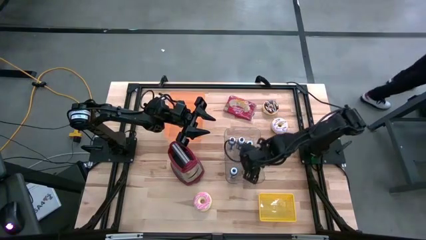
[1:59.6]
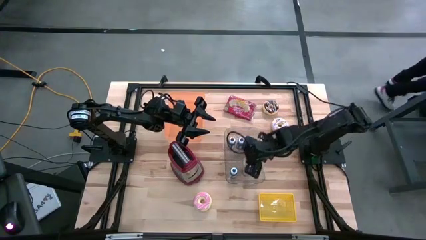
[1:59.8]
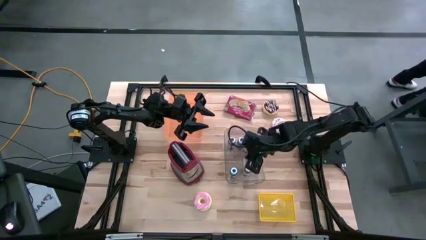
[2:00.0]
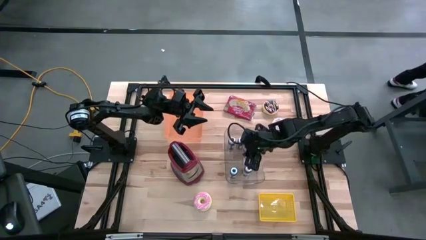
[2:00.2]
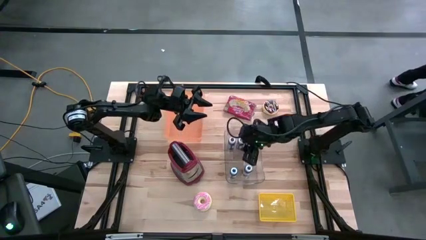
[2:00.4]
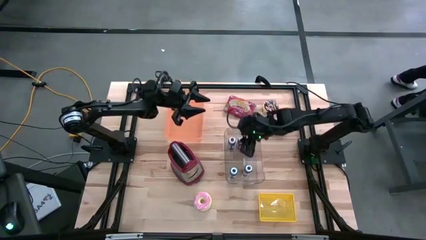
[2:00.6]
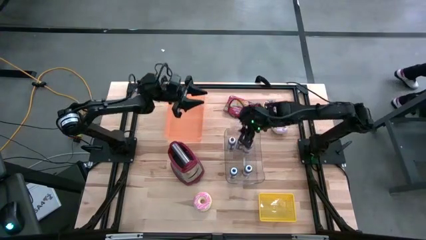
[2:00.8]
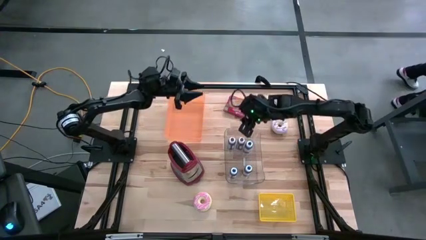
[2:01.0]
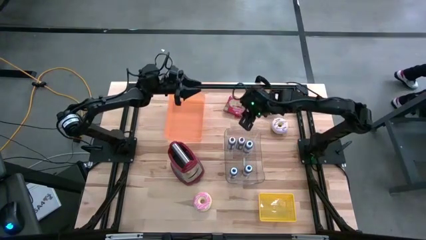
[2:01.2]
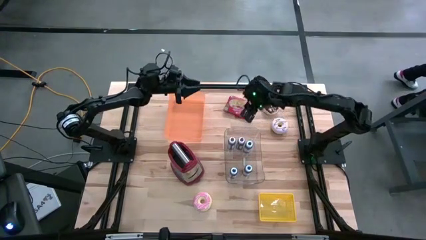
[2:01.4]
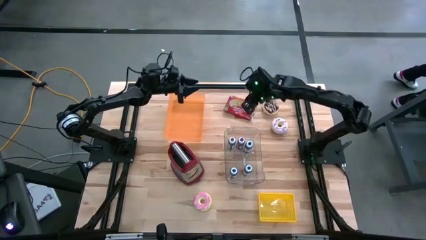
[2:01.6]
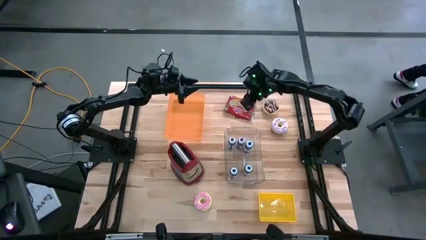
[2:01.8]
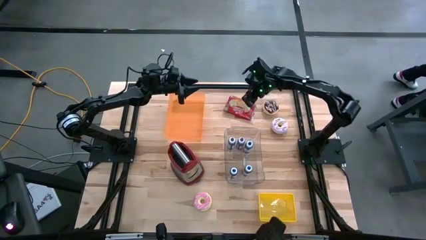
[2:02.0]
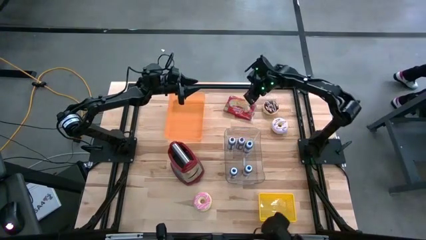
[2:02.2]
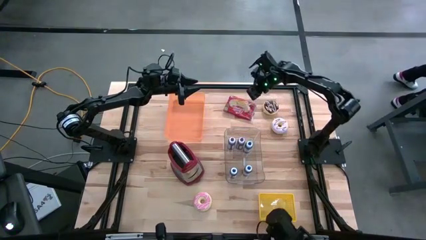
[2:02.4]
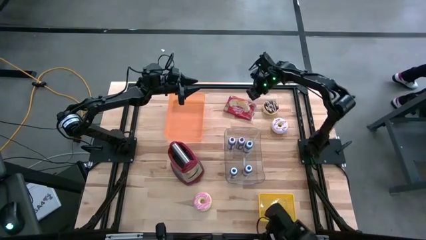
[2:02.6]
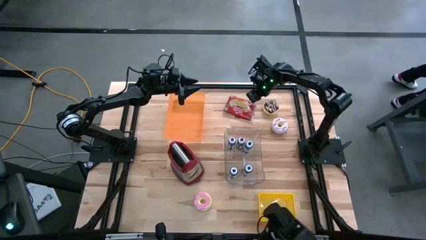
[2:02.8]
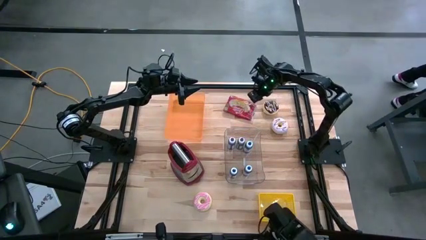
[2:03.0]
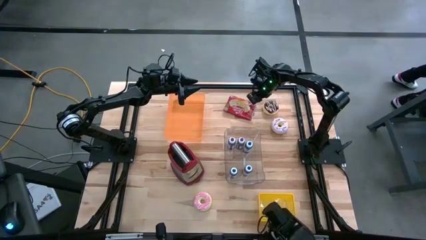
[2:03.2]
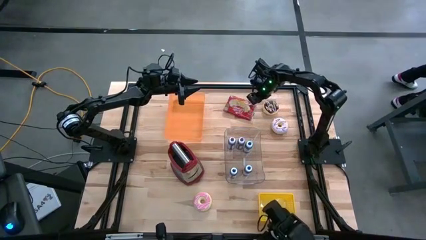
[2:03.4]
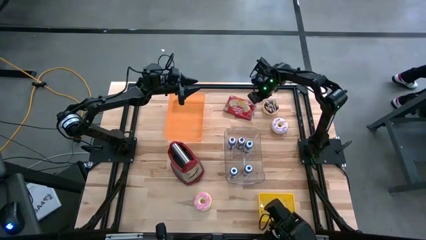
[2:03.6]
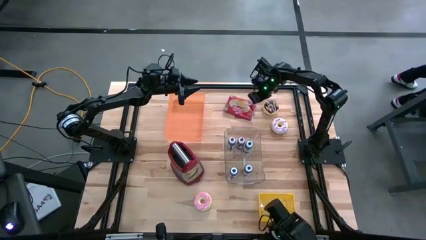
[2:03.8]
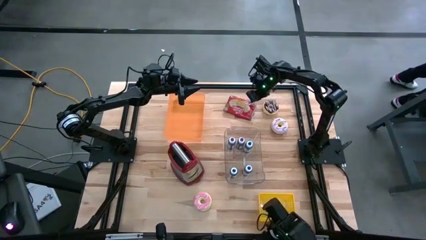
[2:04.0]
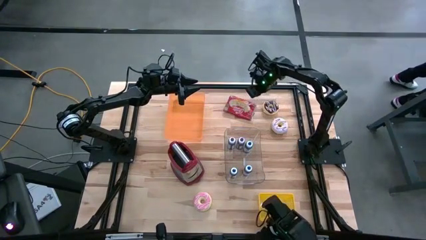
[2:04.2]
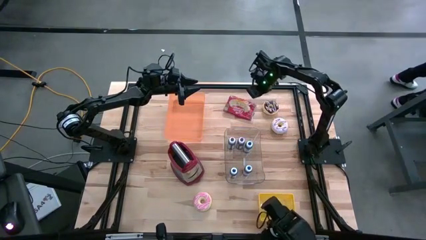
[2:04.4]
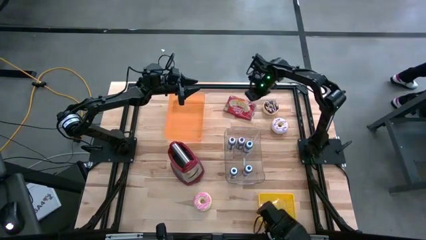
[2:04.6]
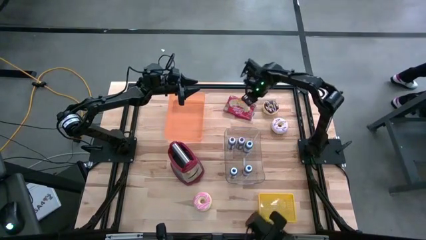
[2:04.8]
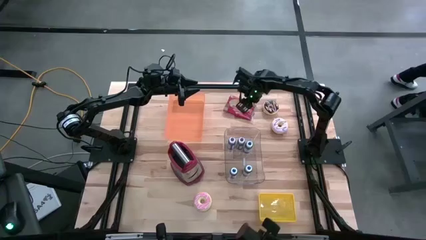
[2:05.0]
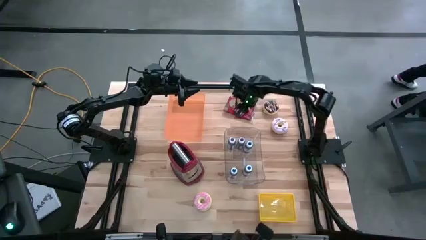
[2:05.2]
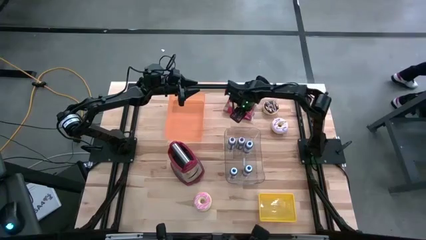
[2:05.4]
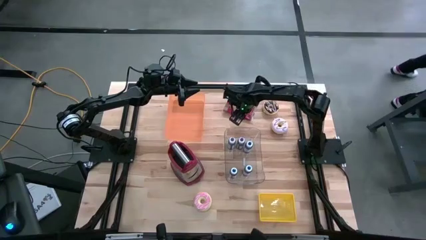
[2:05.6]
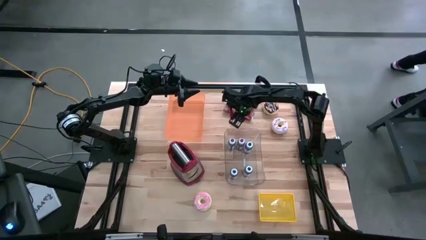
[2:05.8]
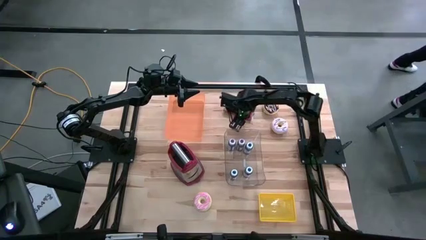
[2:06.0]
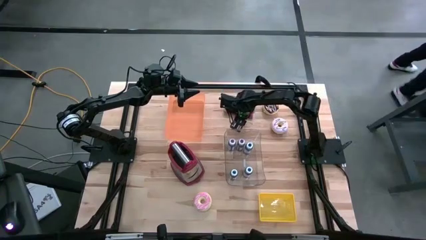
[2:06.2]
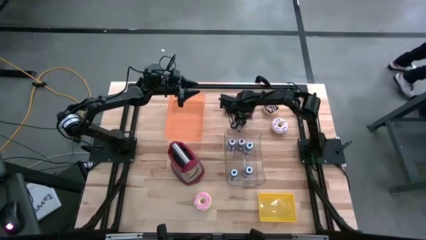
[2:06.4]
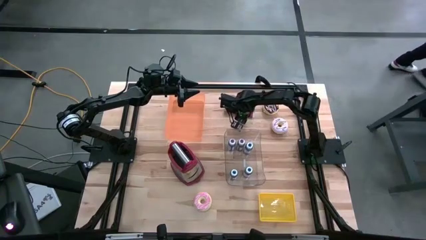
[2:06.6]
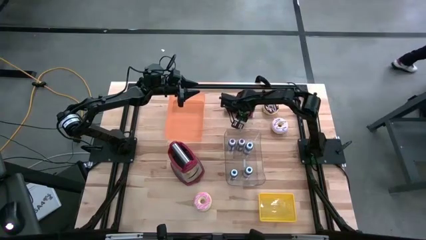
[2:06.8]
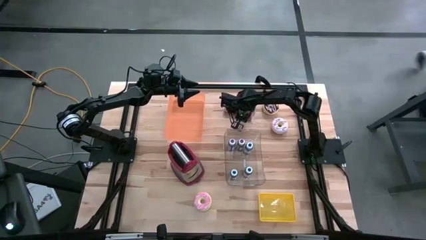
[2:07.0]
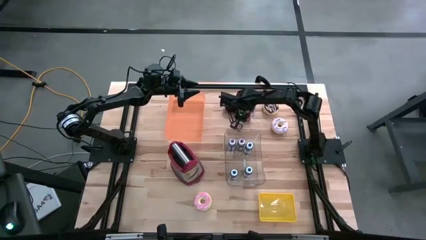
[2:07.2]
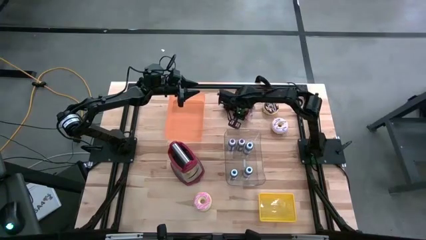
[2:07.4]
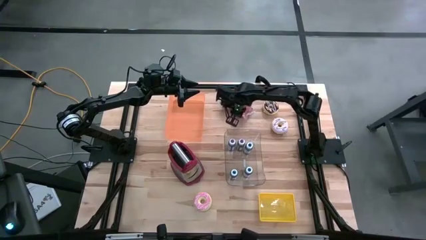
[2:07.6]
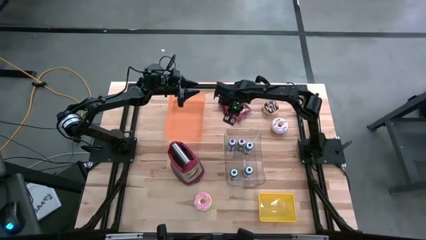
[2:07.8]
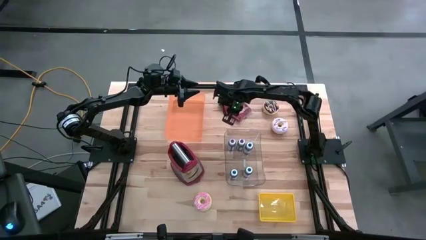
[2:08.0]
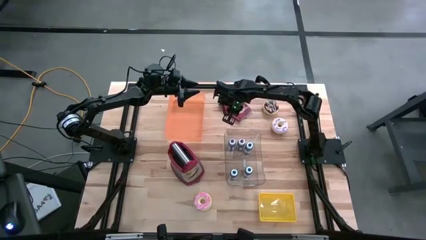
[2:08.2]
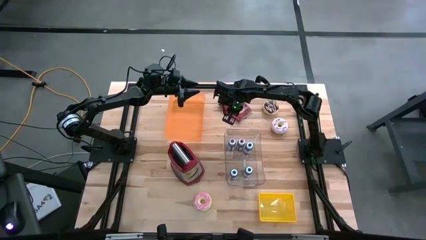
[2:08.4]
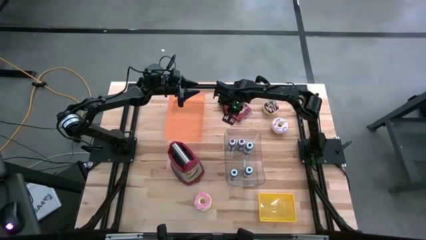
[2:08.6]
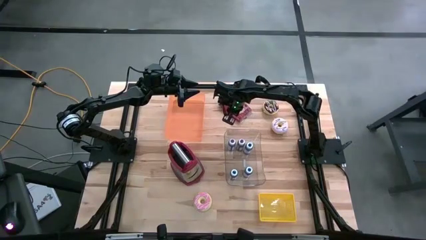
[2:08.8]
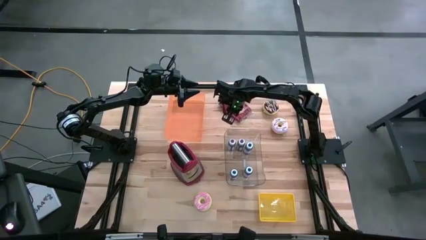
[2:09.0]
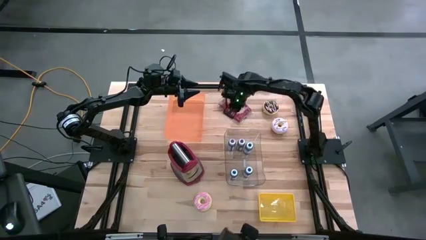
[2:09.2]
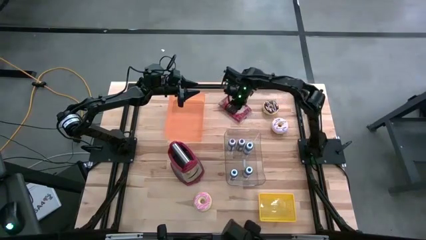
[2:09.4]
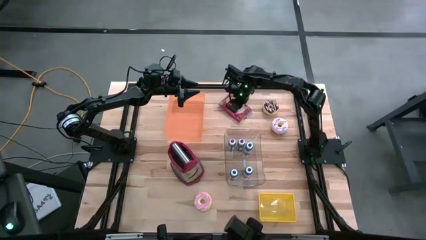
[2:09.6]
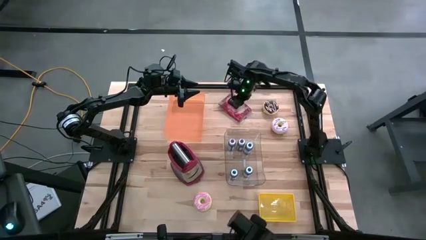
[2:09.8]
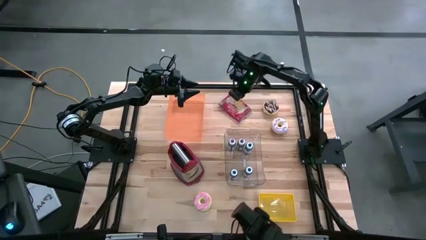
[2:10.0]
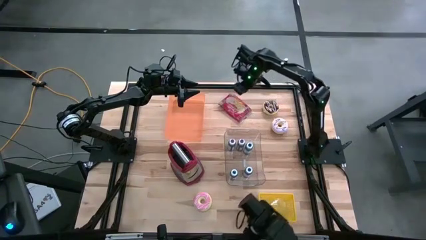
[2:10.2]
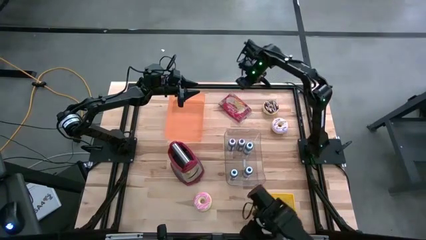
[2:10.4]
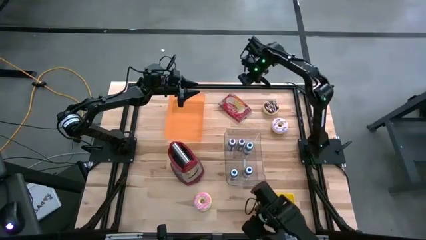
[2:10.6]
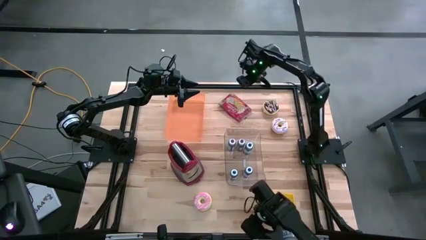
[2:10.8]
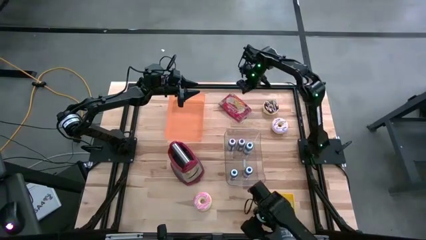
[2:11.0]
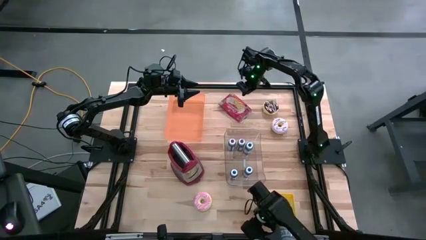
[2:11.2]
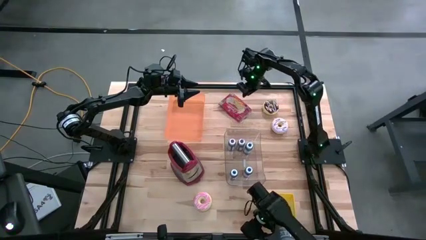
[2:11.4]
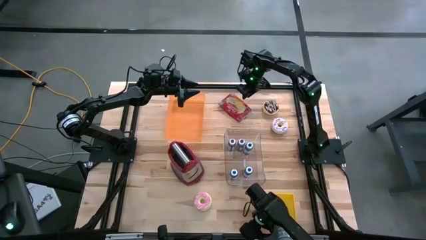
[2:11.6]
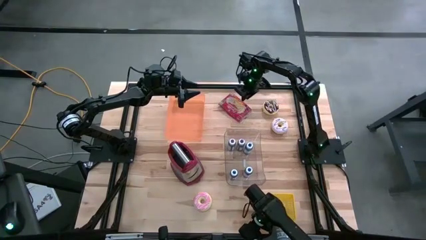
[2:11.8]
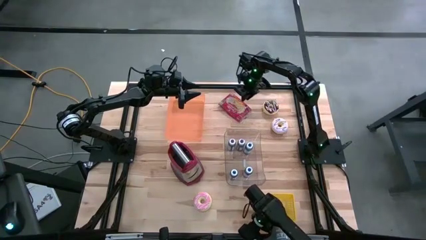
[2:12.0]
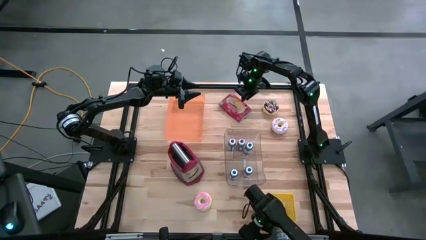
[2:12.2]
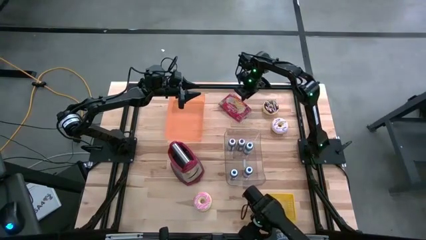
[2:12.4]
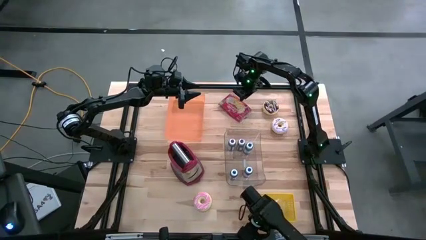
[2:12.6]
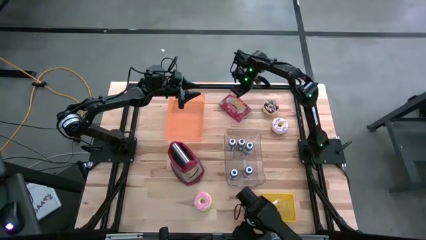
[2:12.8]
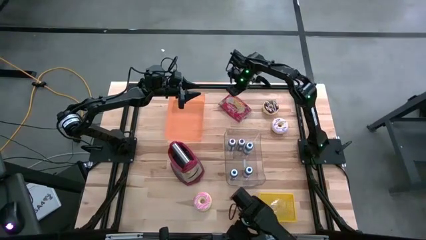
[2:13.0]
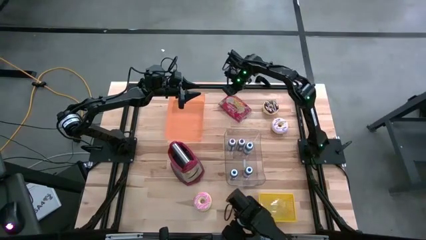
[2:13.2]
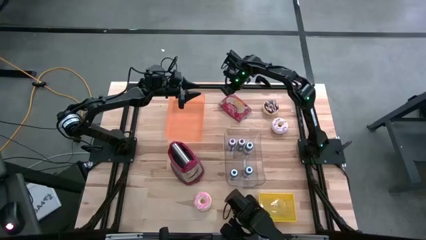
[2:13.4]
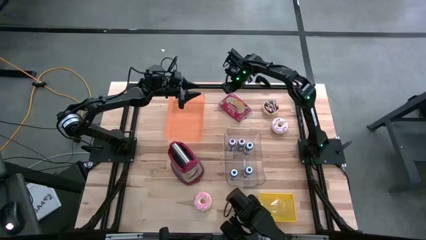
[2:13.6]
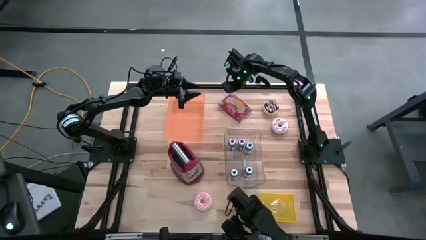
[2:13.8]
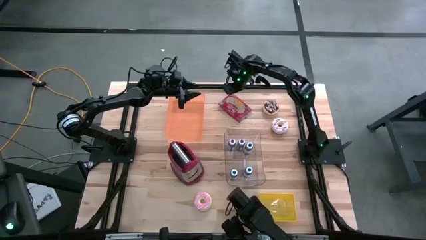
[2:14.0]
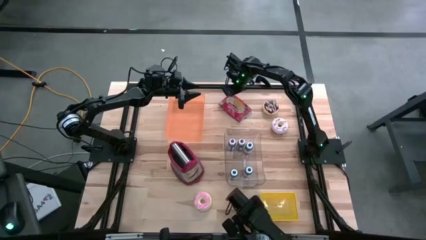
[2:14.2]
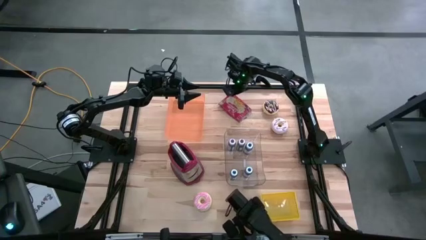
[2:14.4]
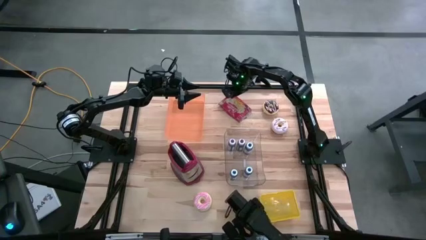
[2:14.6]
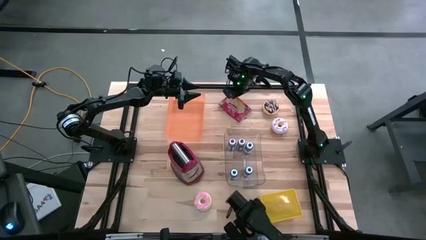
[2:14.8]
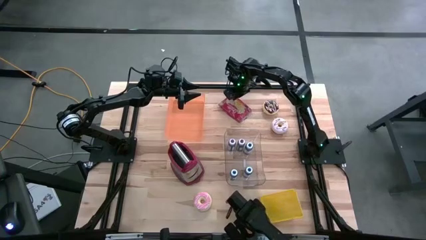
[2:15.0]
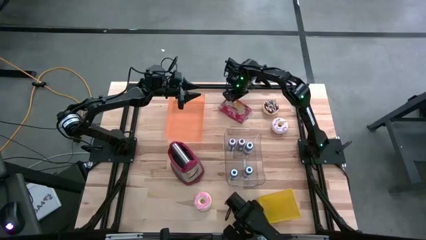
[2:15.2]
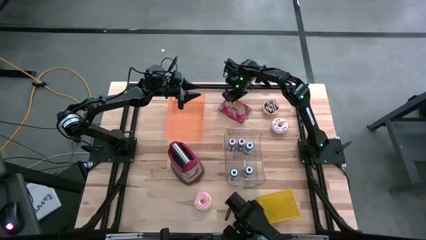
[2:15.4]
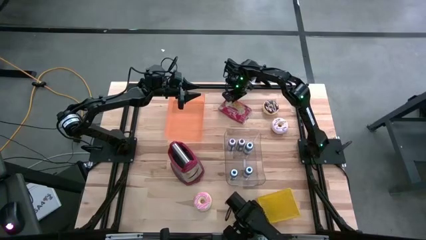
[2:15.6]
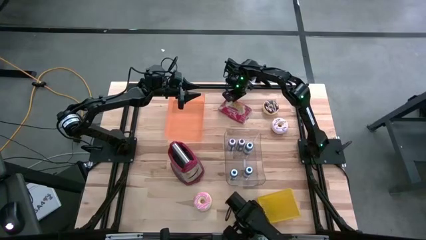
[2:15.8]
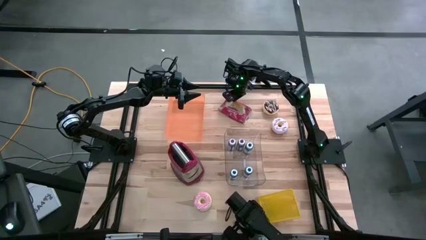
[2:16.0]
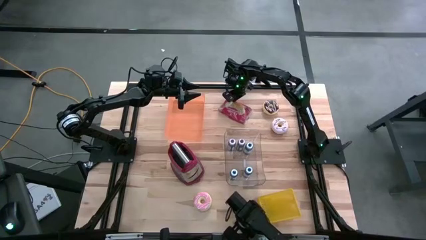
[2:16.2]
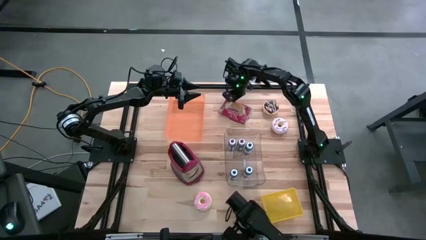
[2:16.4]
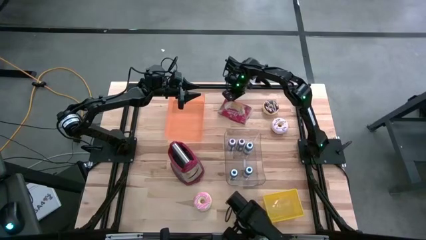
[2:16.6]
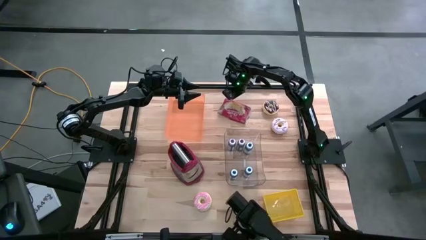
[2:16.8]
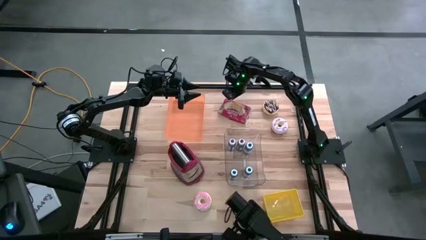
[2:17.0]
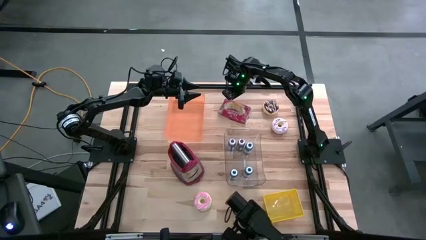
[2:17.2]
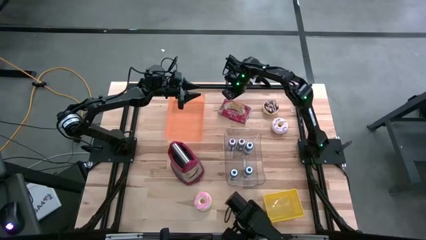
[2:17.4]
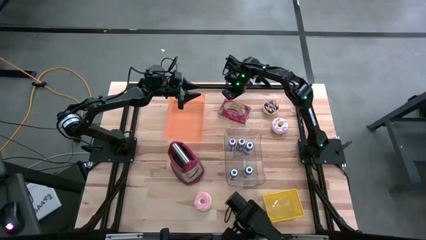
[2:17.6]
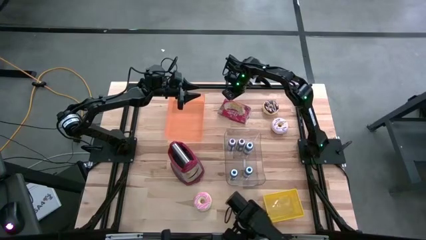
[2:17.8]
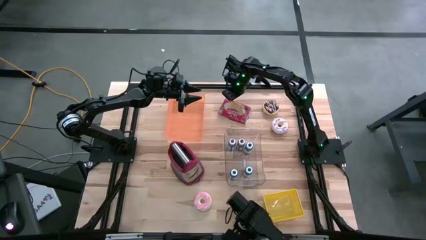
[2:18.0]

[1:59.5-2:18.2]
Task: Pick & Place Food Item
Put the red popcorn pack into the orange bin
